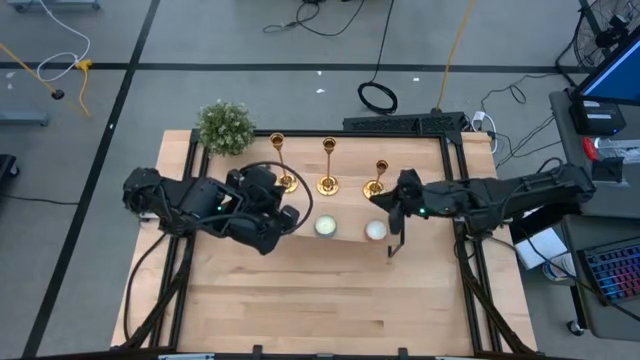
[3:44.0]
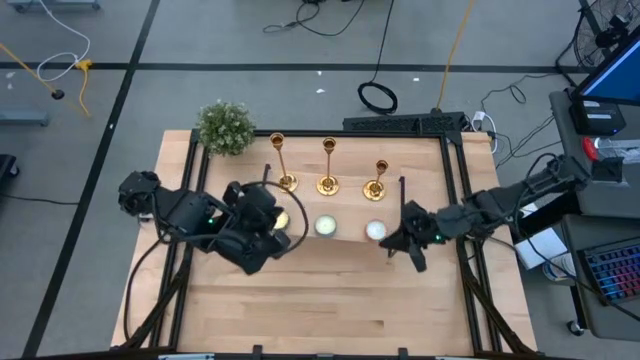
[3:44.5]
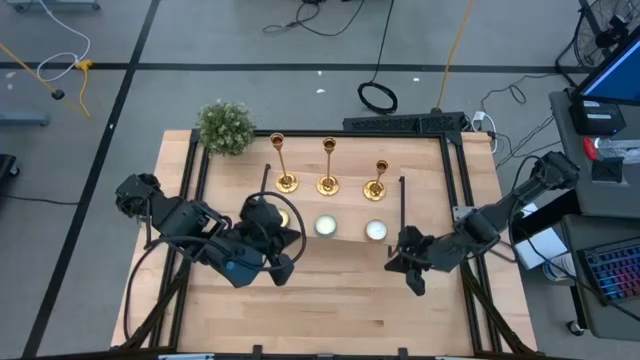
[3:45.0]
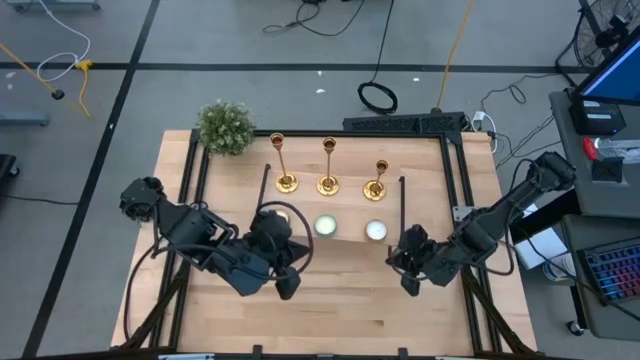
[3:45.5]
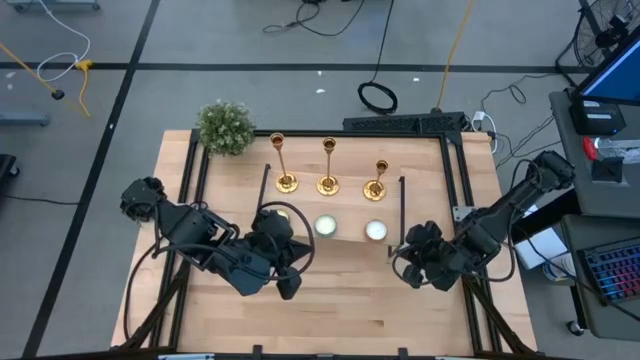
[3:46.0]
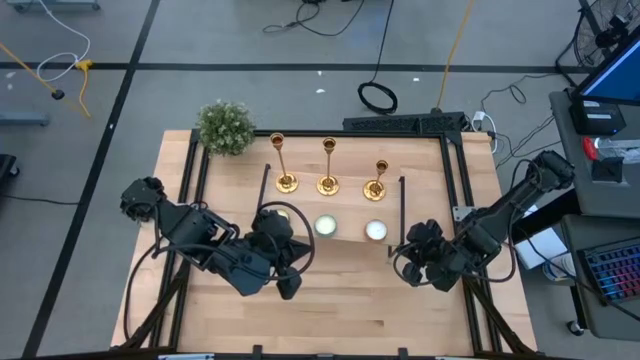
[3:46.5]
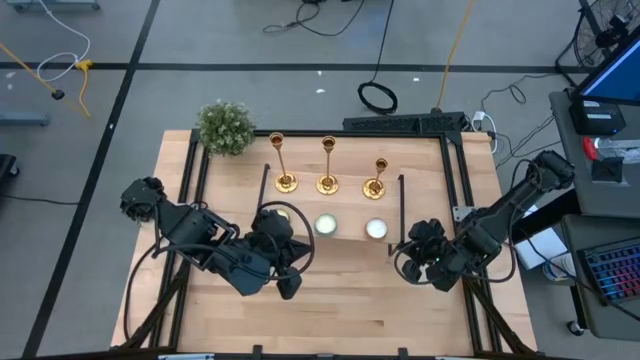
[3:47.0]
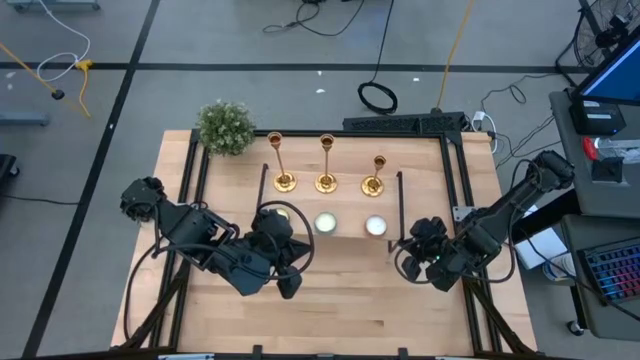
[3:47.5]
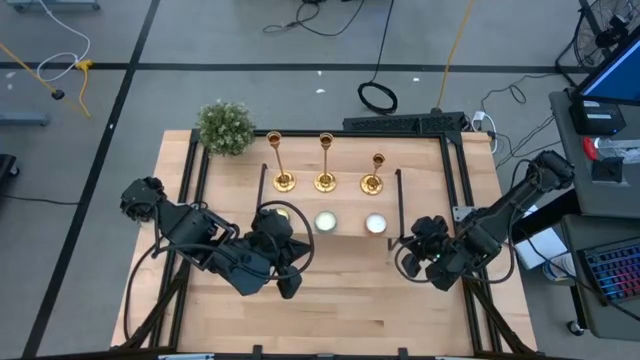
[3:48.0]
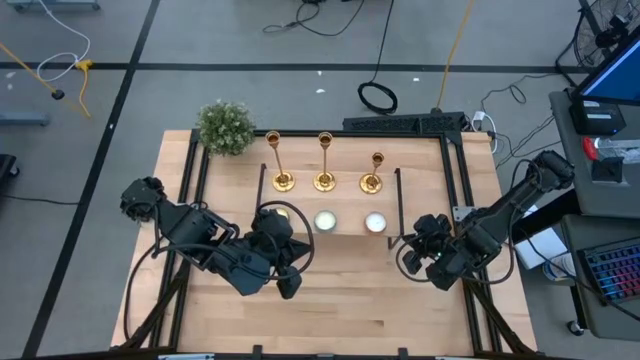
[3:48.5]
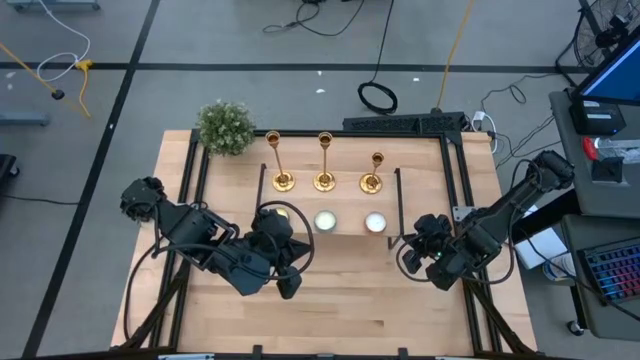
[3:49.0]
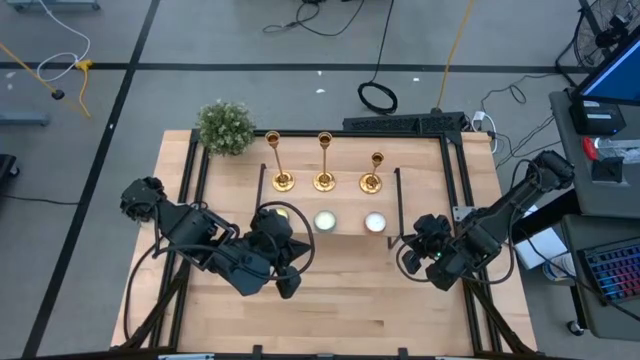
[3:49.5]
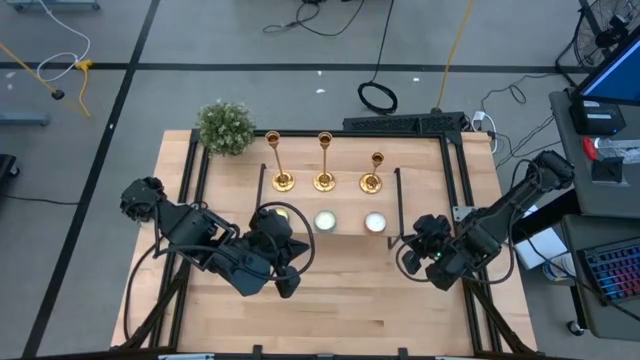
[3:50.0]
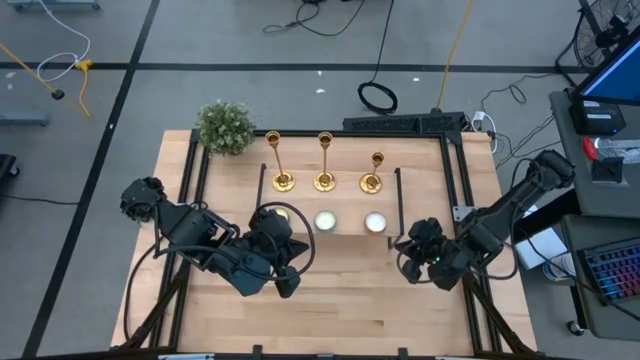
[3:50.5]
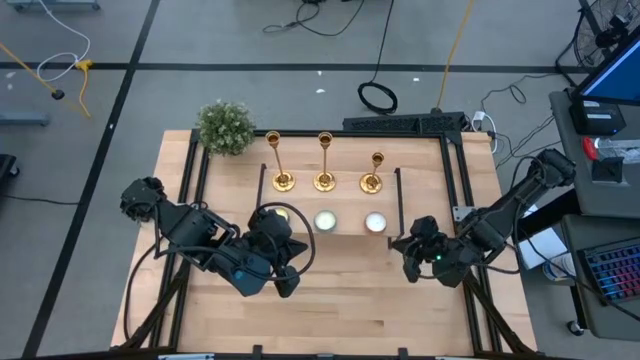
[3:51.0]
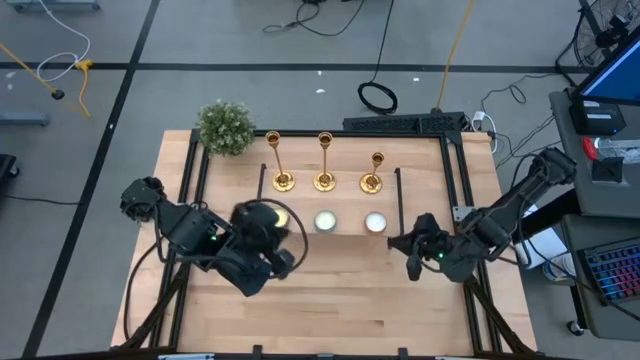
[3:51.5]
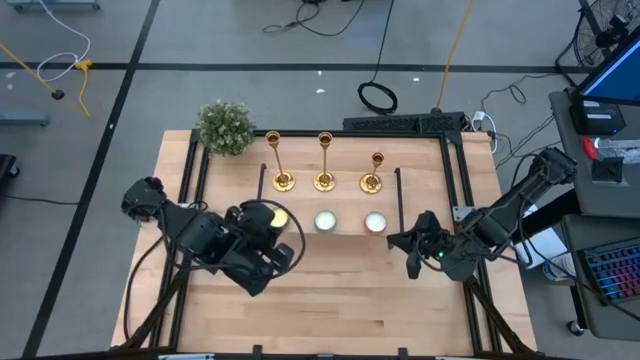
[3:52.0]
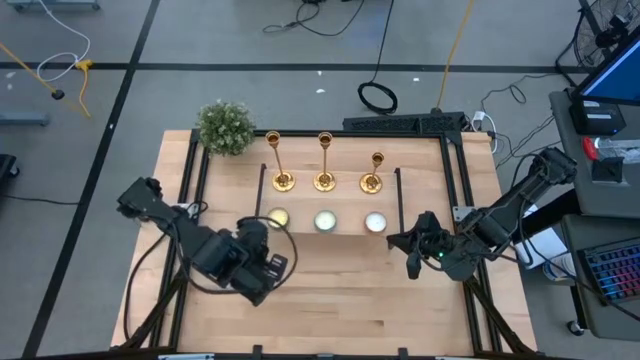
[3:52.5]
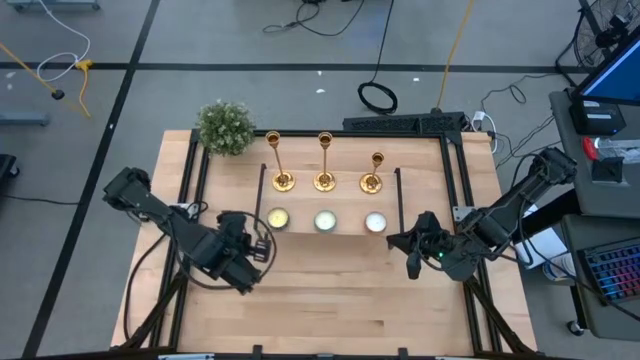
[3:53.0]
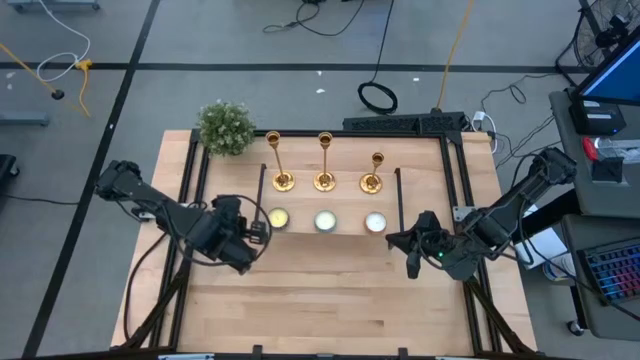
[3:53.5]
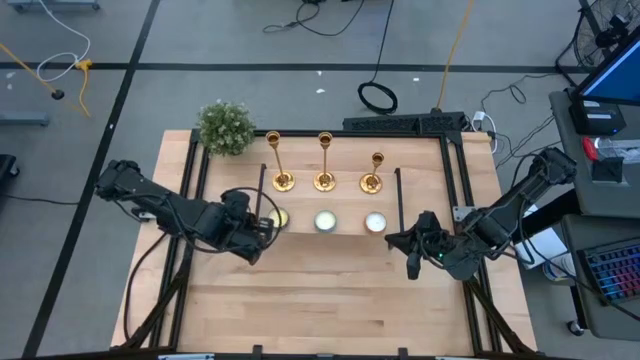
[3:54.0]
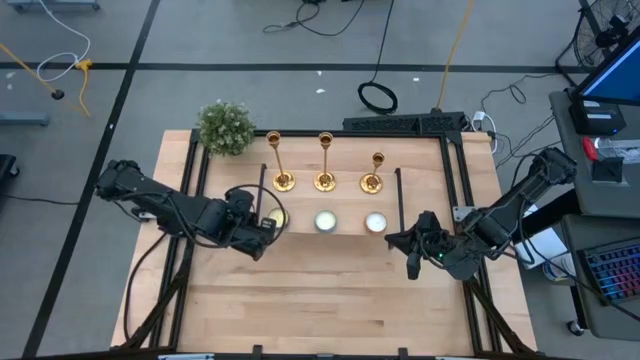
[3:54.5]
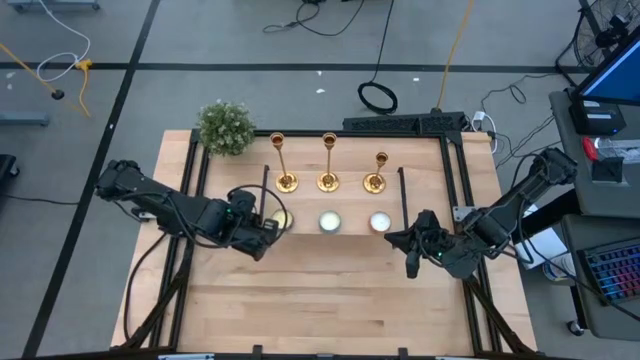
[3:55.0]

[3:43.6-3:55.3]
Task: Pick & Place candle stick holders
Adjust the shelf

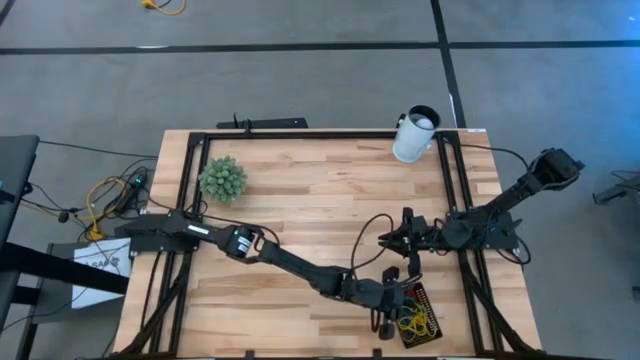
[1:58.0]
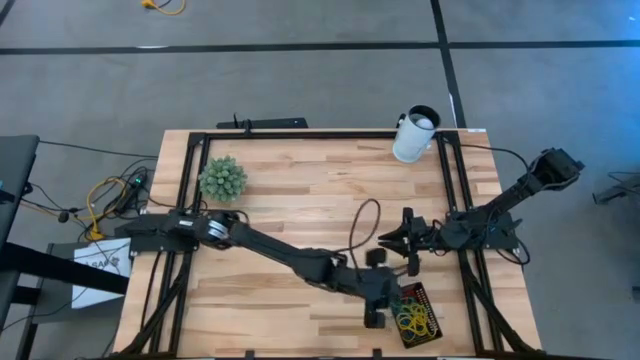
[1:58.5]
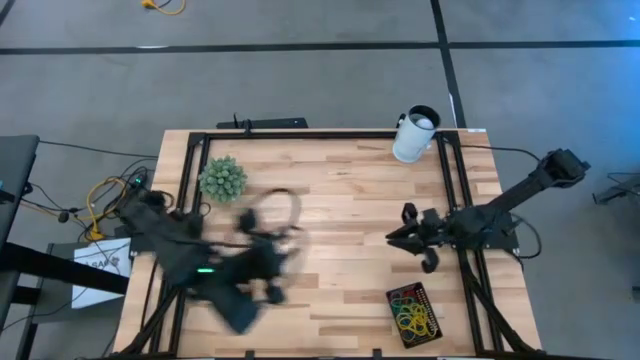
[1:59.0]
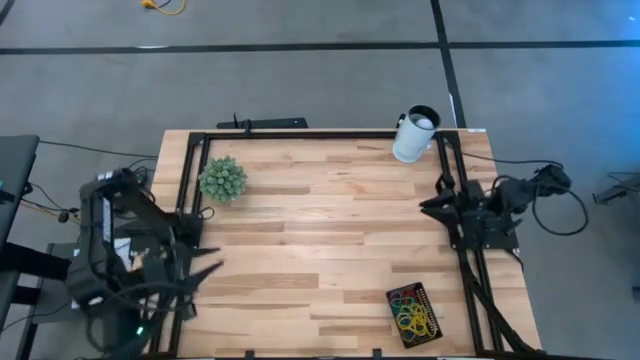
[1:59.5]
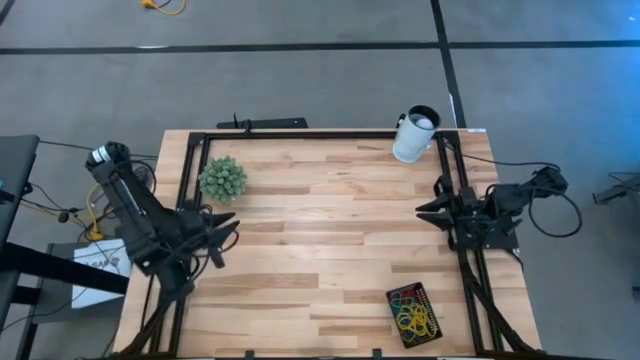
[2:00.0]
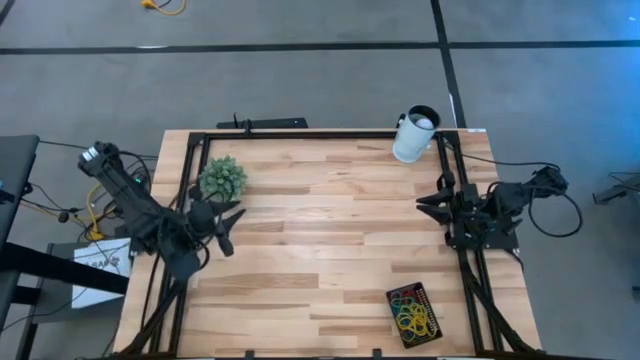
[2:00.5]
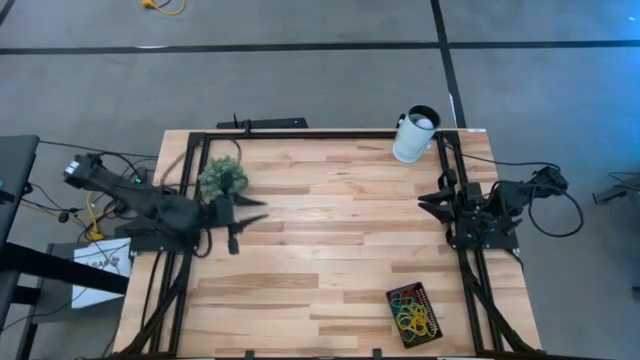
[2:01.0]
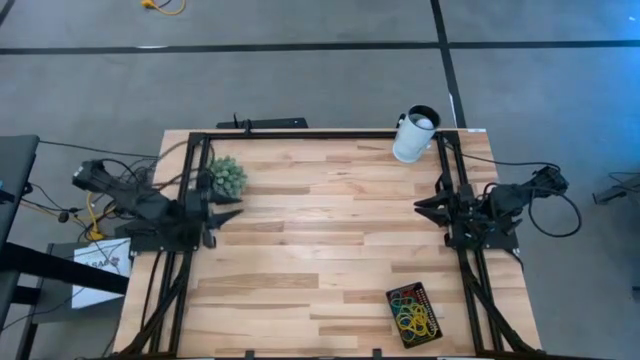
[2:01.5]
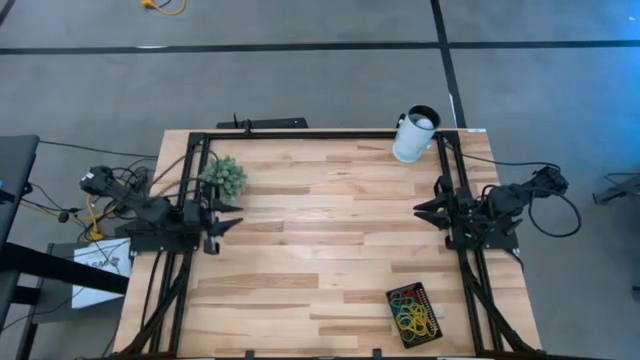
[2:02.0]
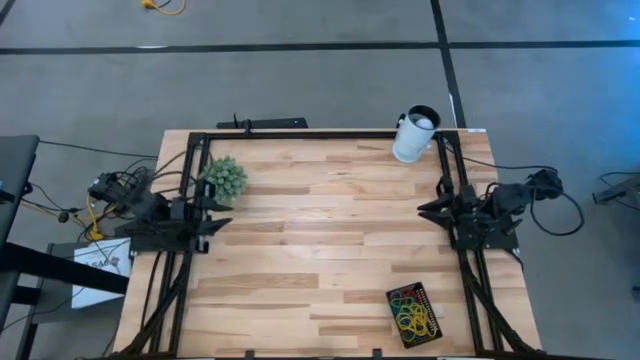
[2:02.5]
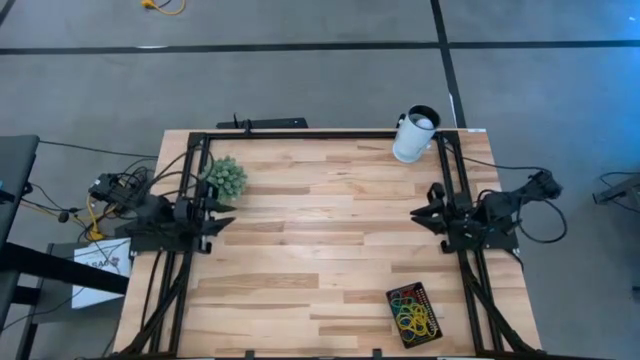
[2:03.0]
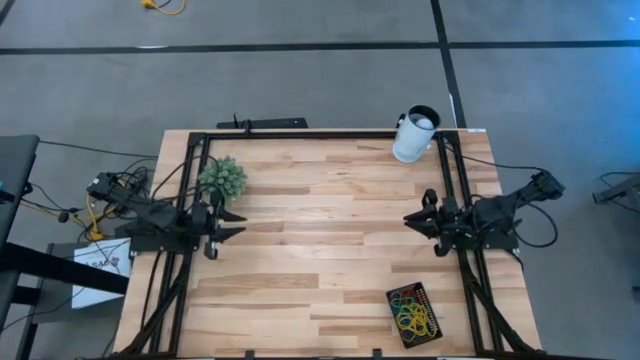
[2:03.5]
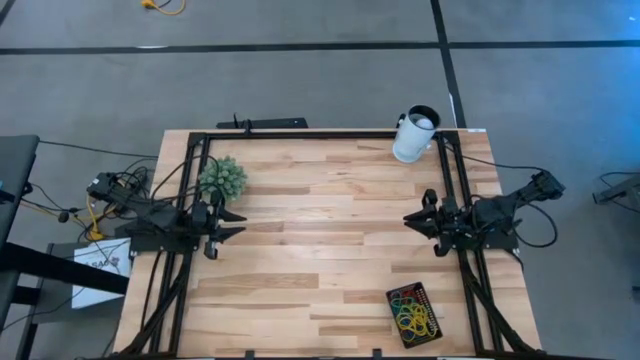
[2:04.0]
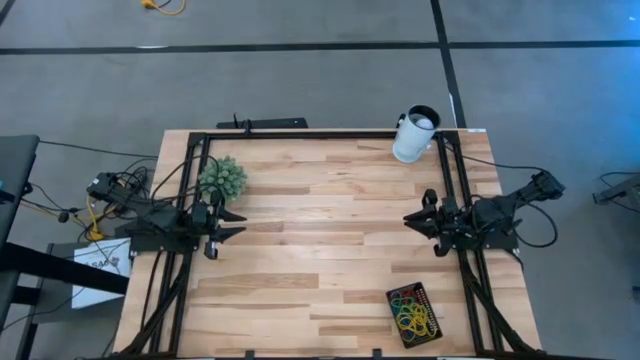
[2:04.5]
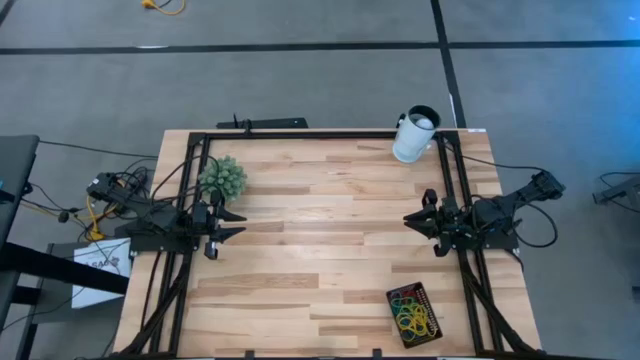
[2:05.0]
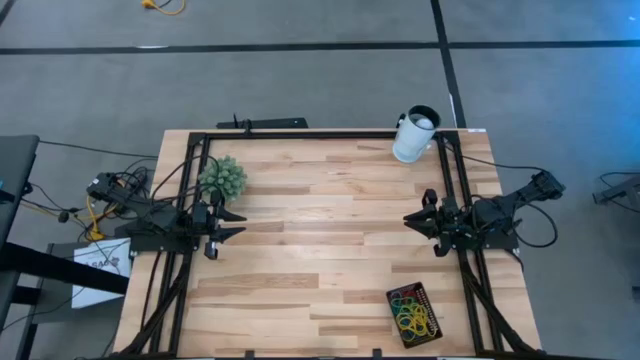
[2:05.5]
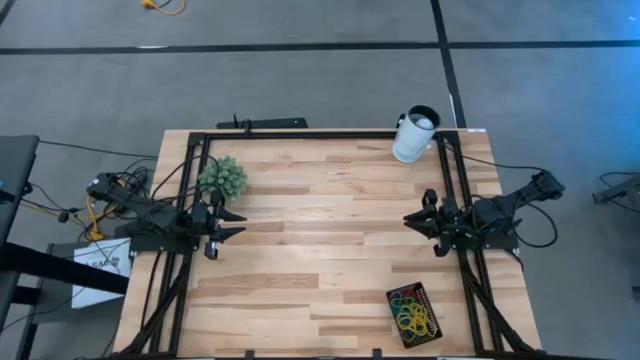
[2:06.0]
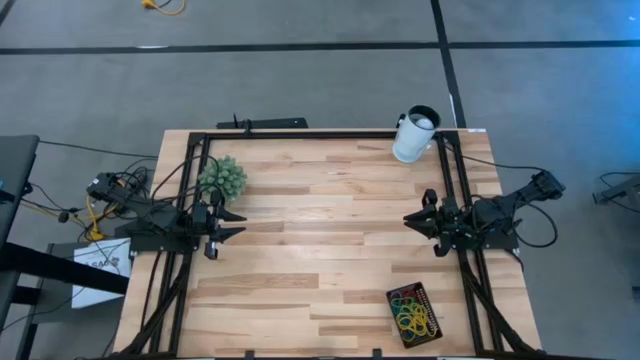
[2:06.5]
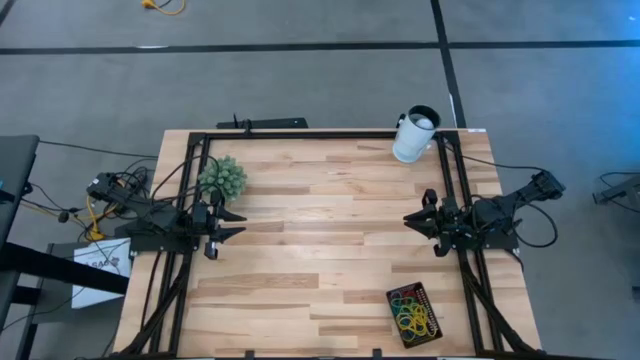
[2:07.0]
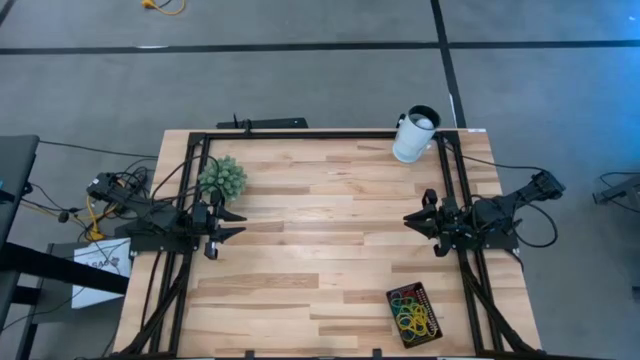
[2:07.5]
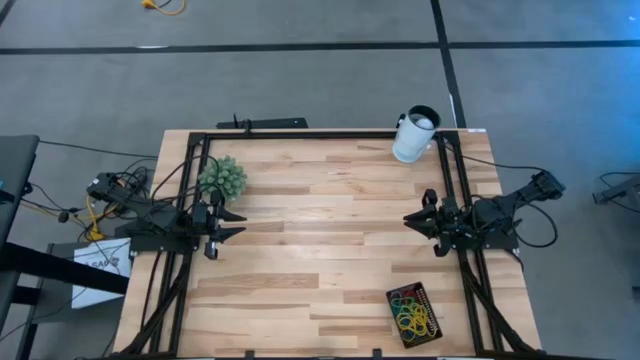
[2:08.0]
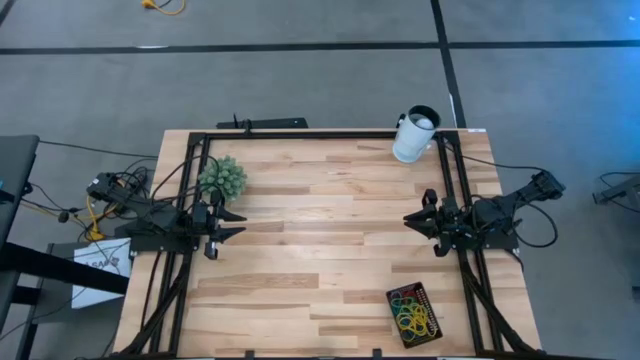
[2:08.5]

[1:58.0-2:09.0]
Task: Pick and place rubber bands into bin
Return to Home Position
